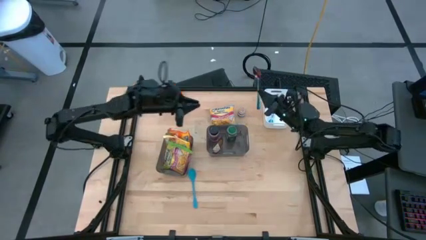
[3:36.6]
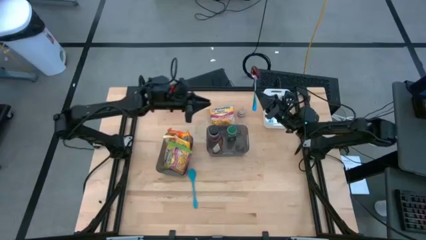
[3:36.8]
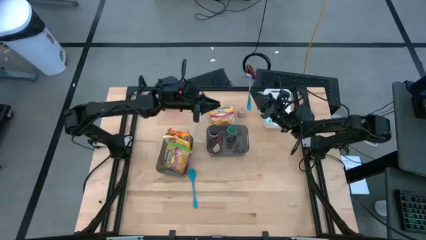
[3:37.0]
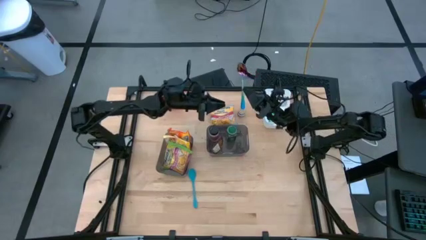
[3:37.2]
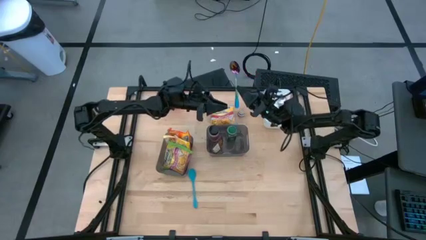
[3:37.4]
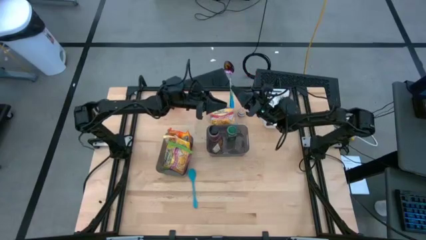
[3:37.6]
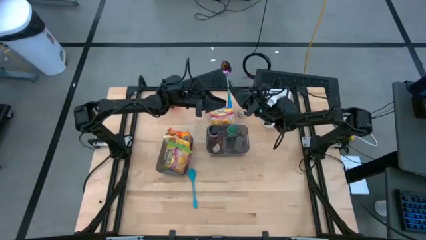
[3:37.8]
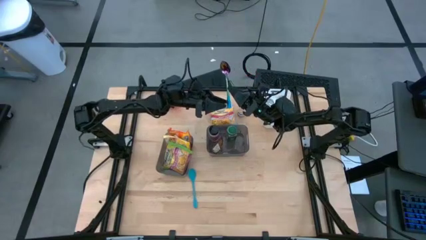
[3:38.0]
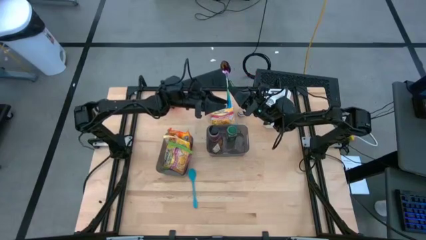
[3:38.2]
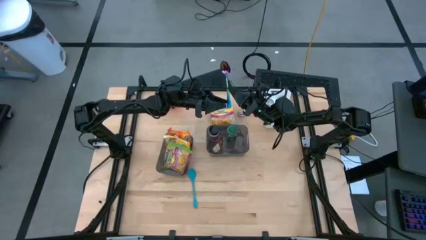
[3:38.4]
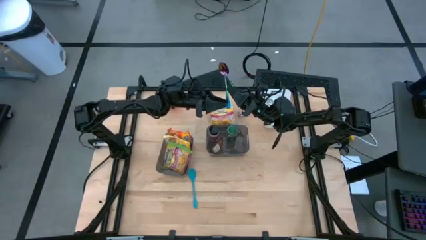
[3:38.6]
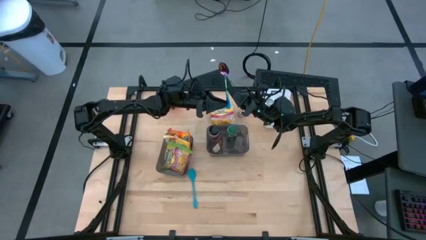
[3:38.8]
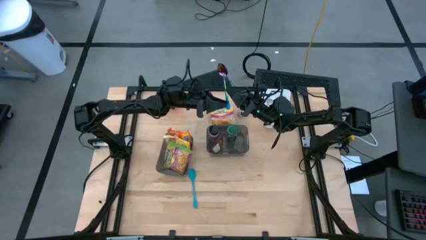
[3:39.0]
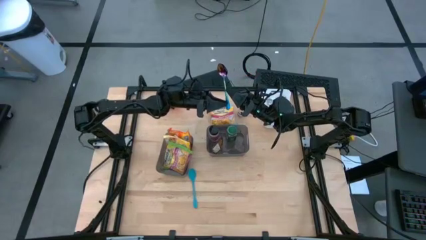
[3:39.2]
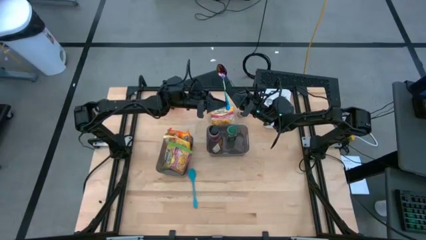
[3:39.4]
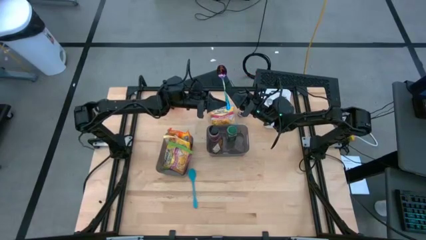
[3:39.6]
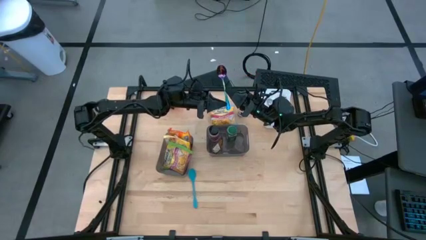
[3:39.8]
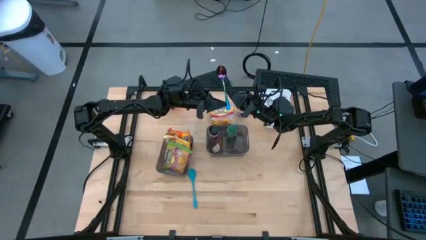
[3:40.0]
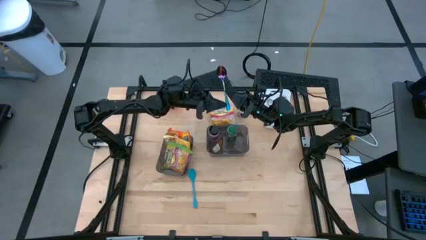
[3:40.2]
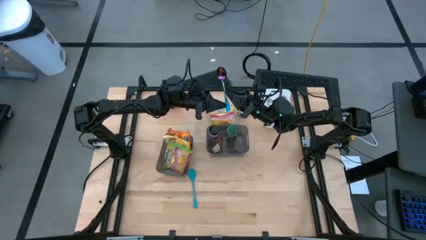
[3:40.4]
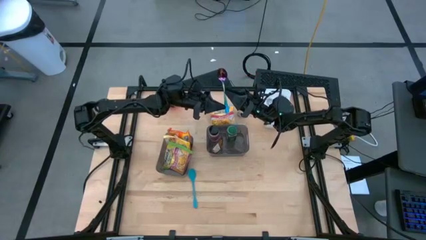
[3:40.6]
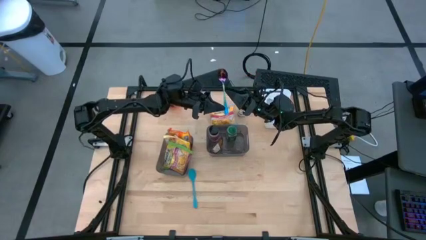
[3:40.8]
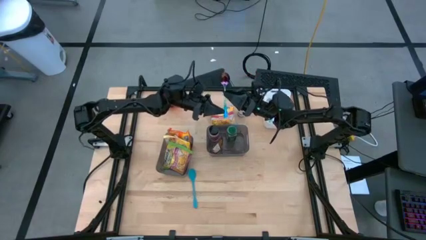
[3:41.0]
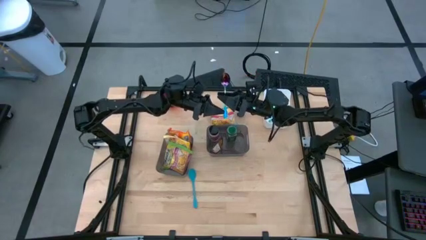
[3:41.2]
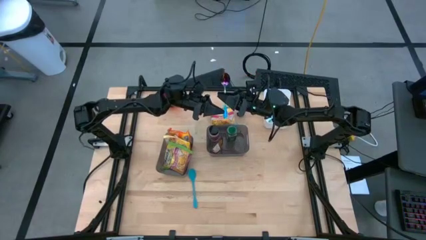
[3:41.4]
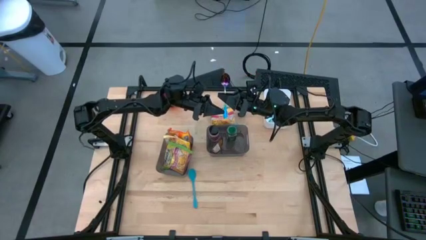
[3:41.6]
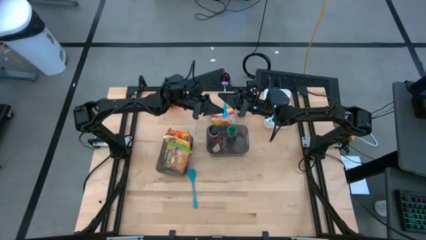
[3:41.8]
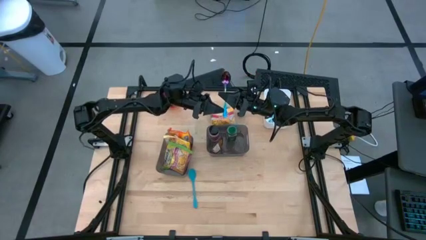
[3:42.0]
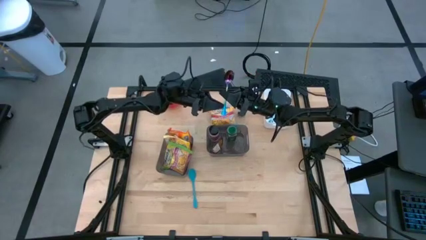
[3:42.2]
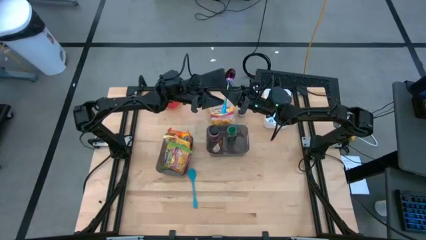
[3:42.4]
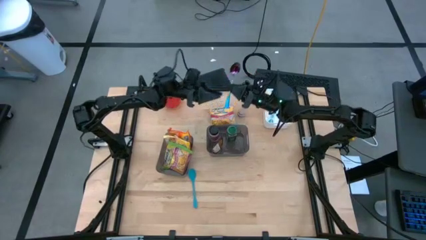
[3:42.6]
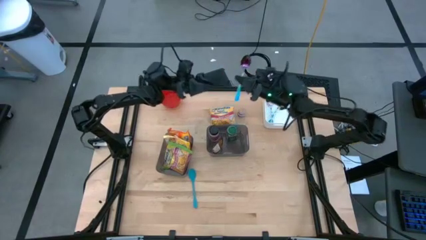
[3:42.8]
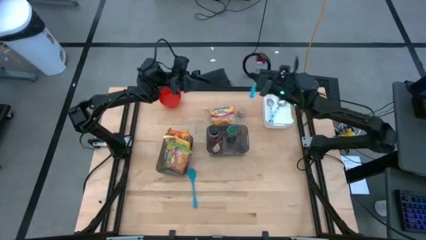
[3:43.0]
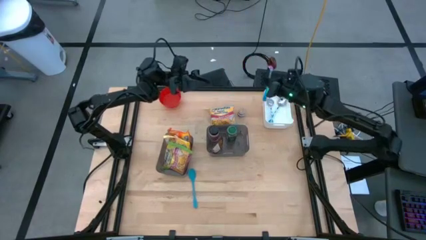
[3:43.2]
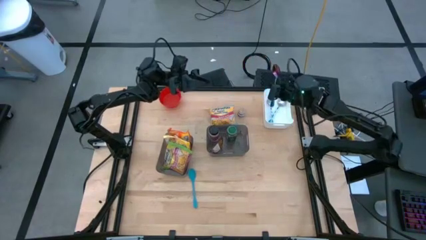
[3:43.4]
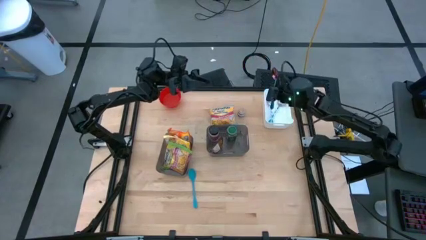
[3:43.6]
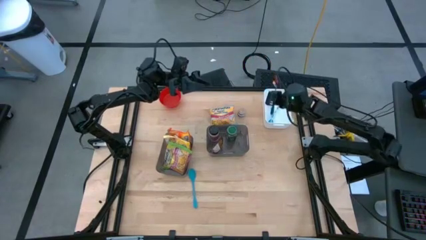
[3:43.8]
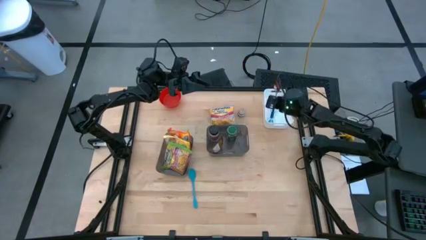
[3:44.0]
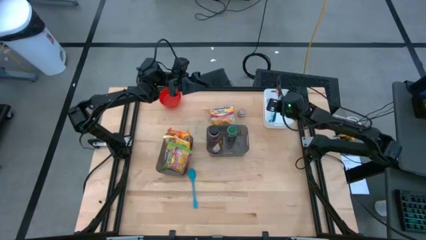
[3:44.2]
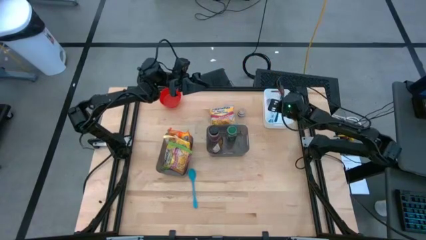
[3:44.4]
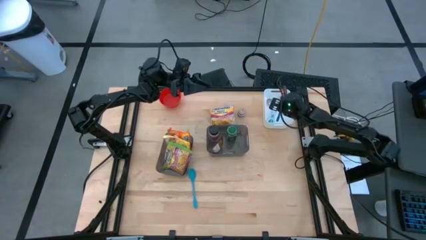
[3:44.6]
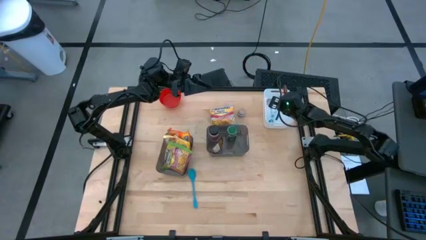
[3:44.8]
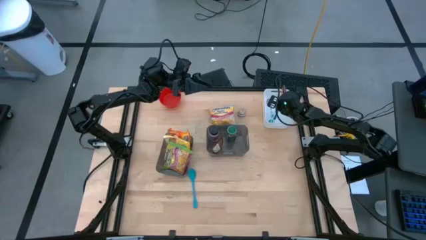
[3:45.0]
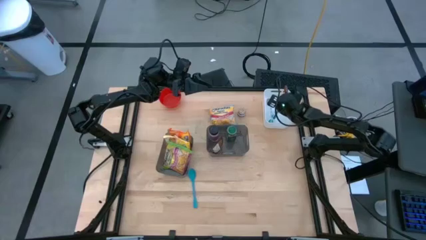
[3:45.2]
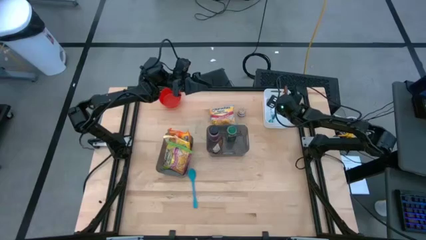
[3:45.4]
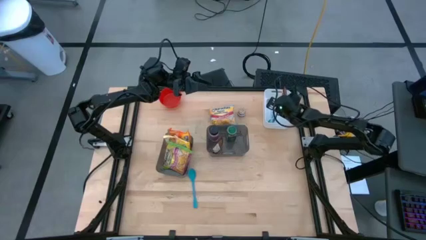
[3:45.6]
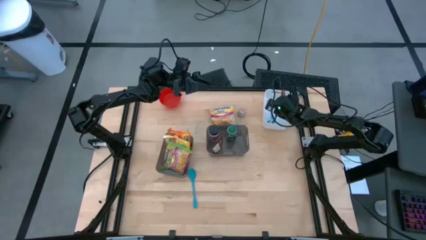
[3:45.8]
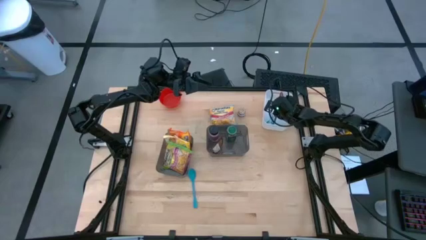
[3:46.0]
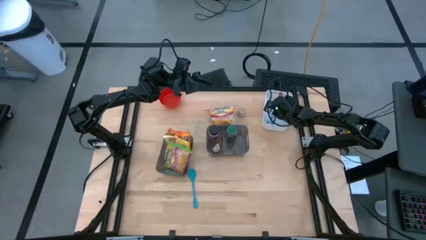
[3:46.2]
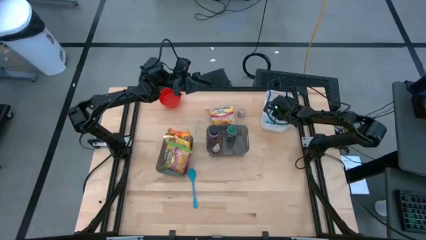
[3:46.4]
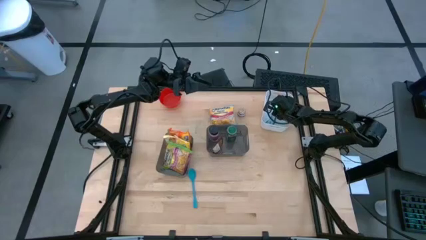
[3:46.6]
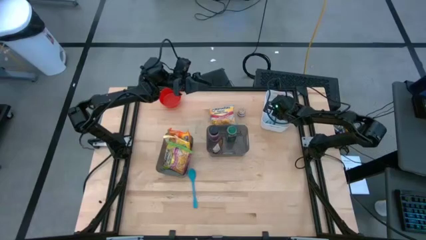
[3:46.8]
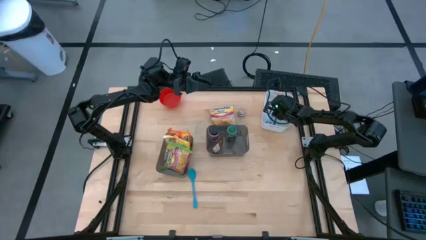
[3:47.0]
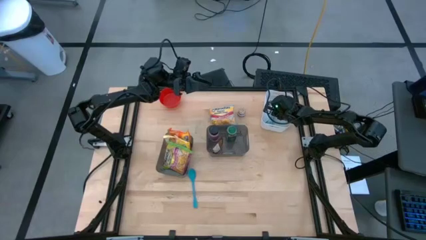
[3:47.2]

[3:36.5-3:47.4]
Task: Pick & Place Food Item
Put the blue spoon into the white bin
